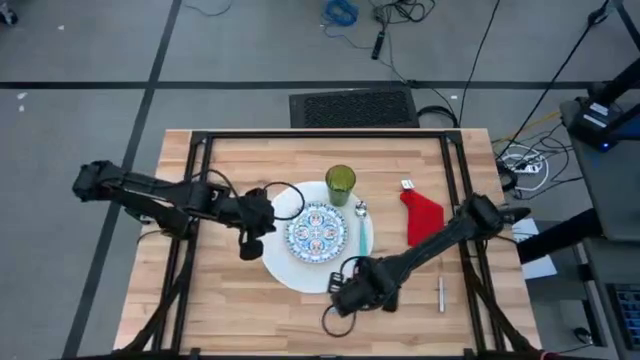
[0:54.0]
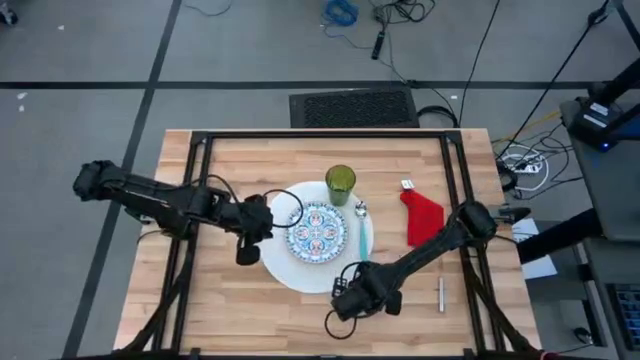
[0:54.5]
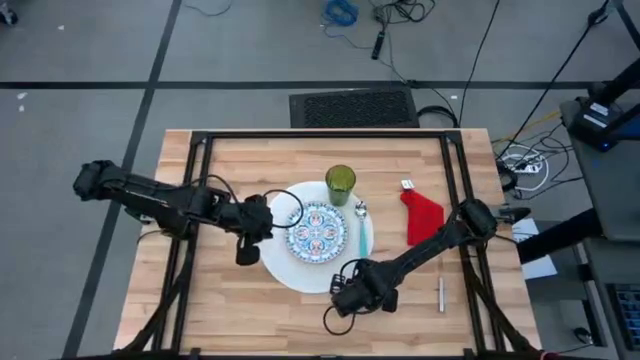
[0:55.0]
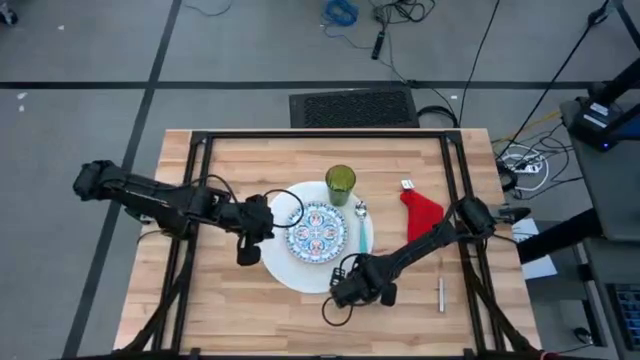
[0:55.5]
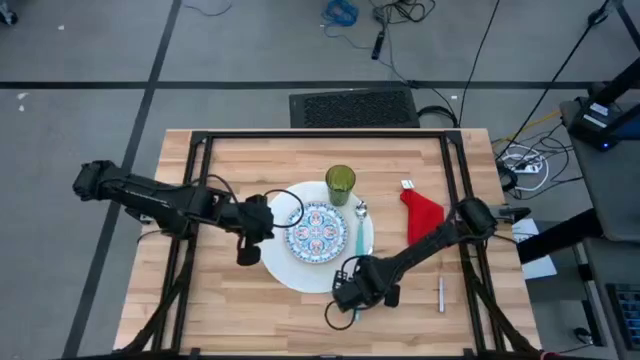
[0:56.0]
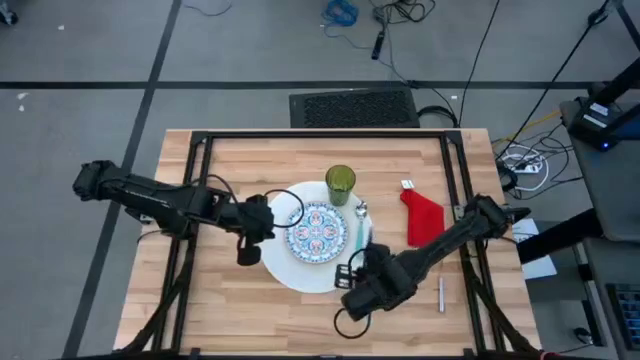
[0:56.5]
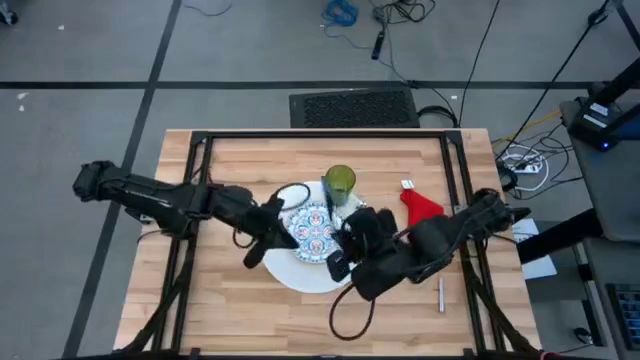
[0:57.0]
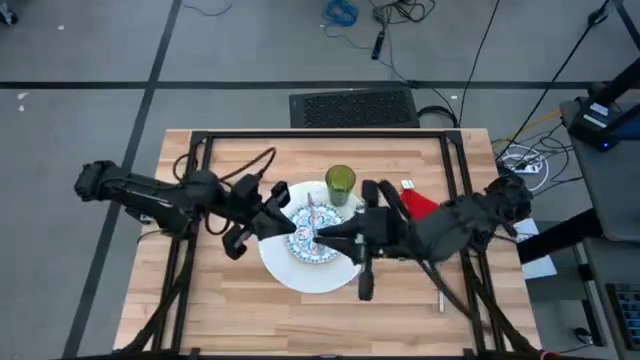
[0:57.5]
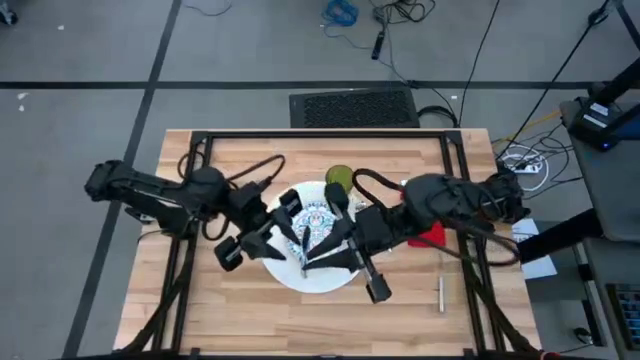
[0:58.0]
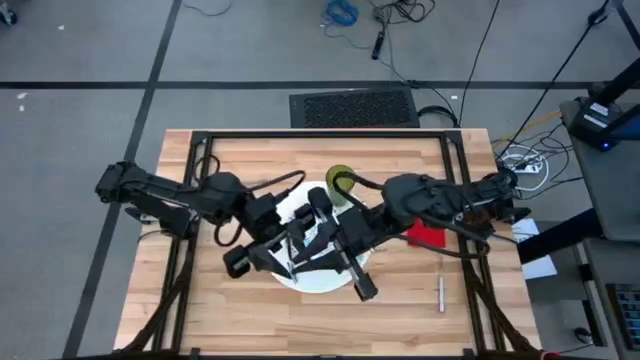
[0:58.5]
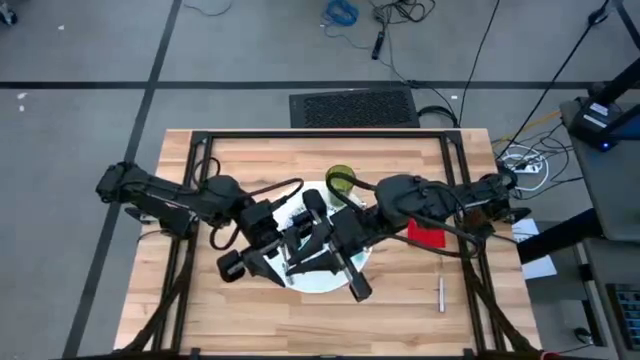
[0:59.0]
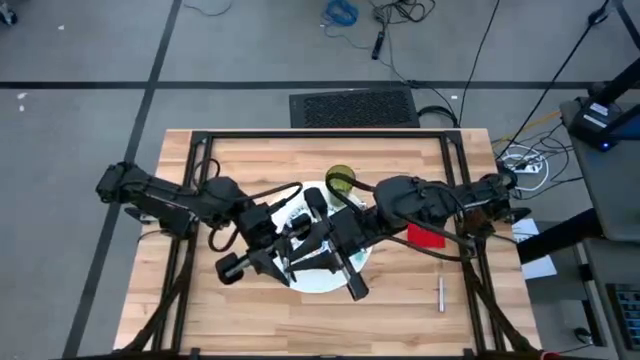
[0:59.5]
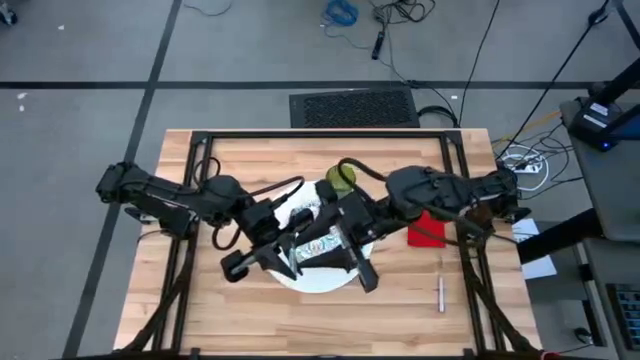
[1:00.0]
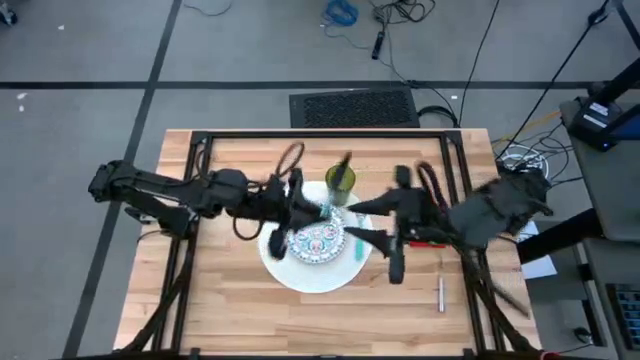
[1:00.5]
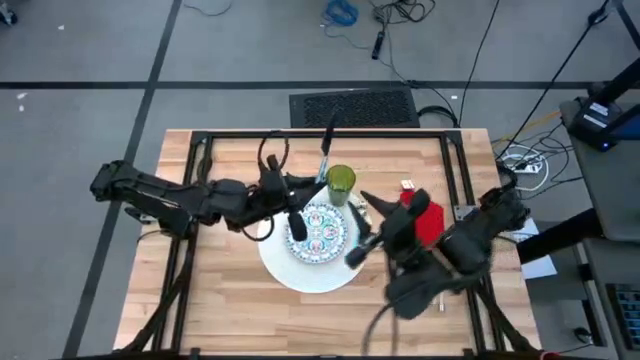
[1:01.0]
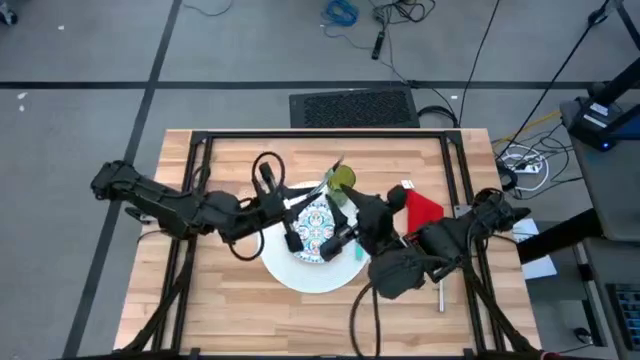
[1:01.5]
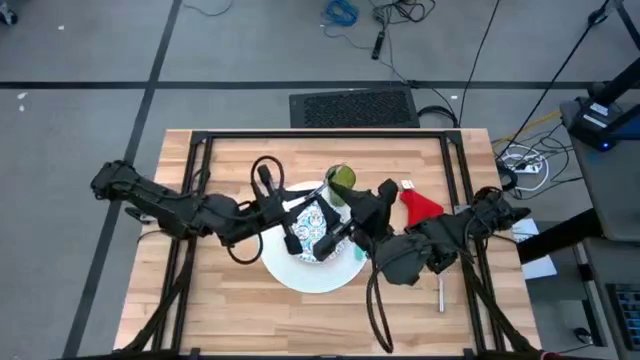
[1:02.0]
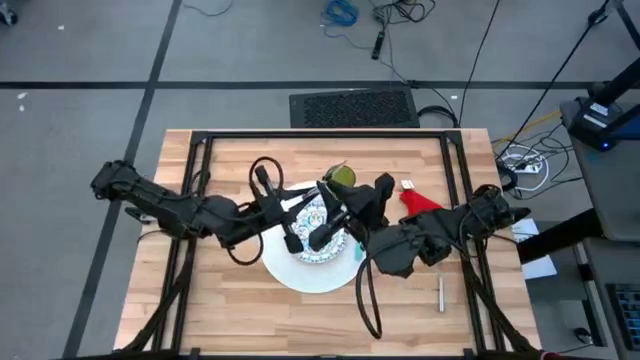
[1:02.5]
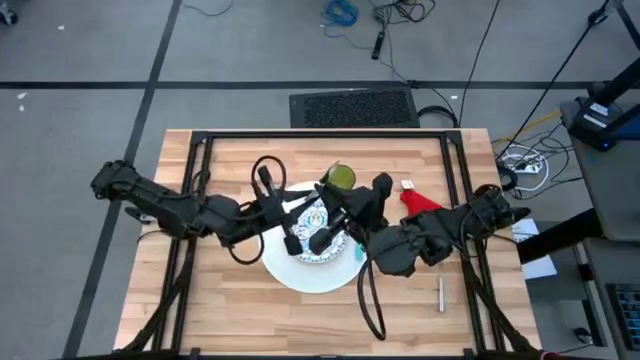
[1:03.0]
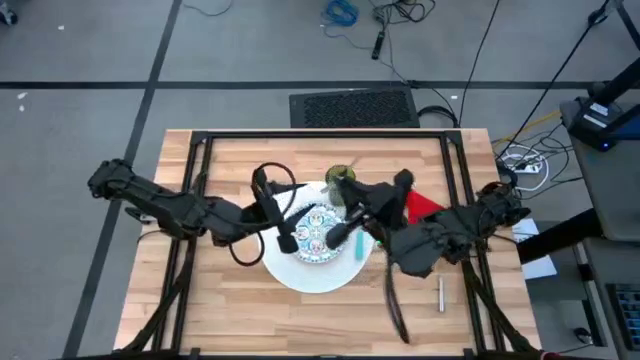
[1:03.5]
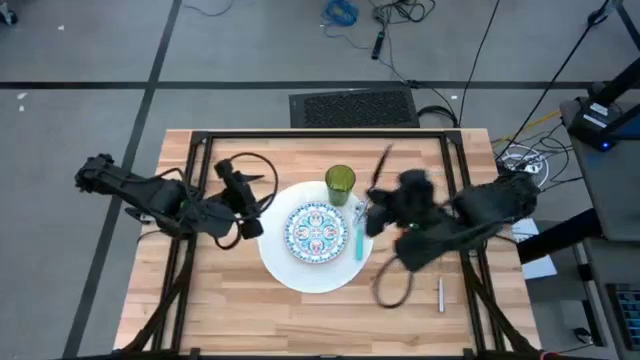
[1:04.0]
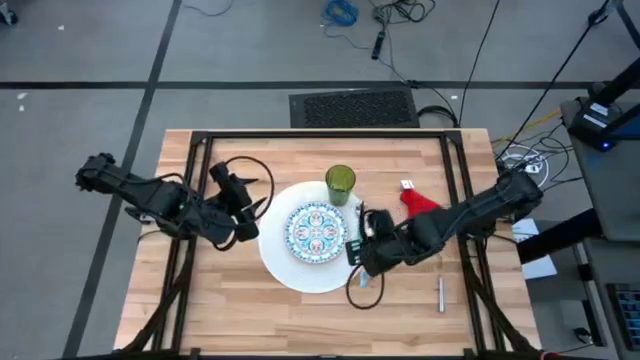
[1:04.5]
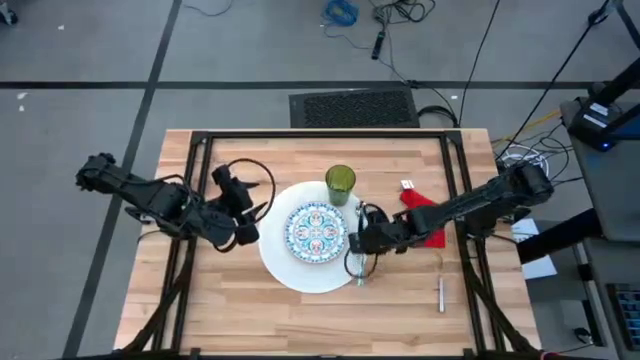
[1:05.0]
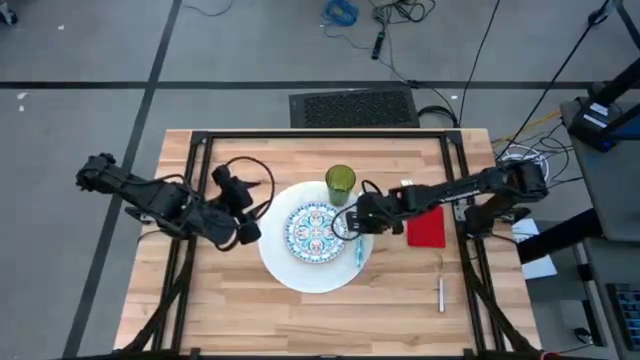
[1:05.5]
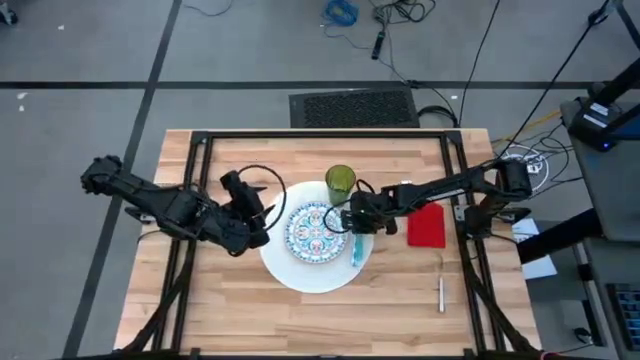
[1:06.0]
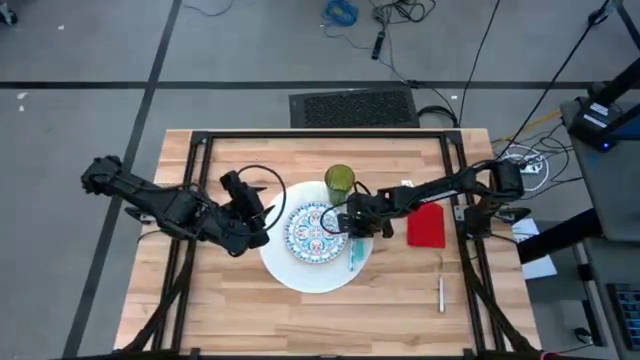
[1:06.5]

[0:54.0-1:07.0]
Task: Set table place
Put the white knife between the white plate and light blue on the white table placemat

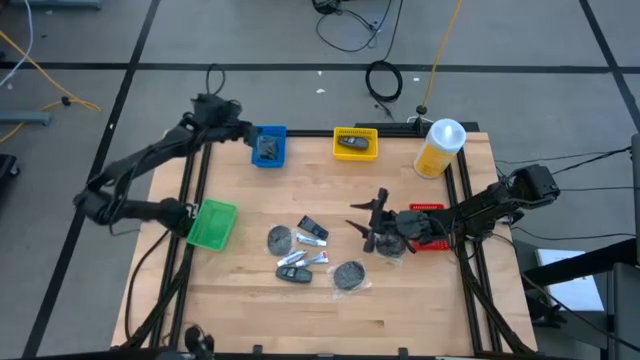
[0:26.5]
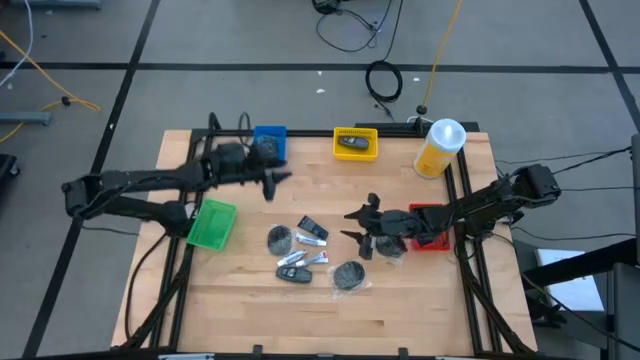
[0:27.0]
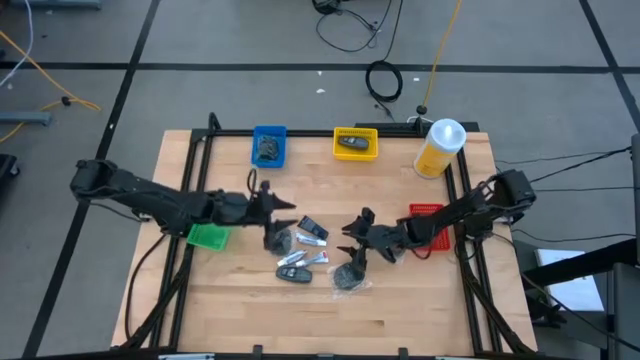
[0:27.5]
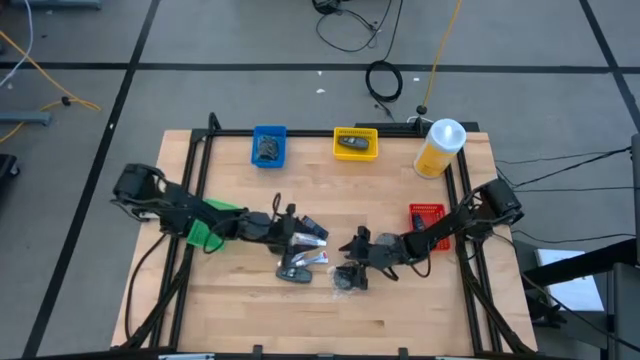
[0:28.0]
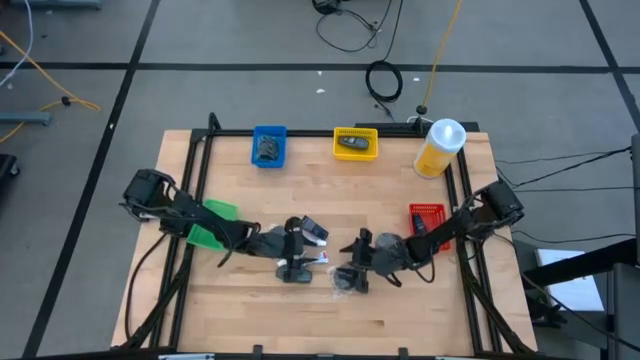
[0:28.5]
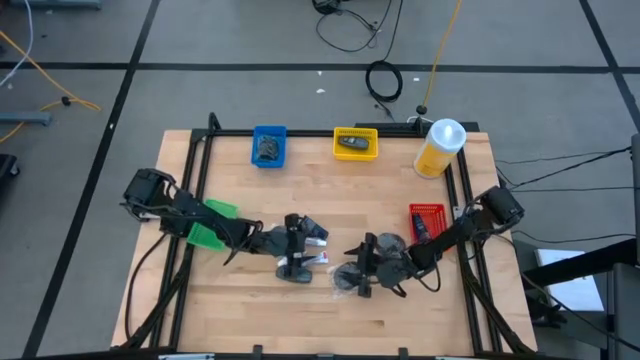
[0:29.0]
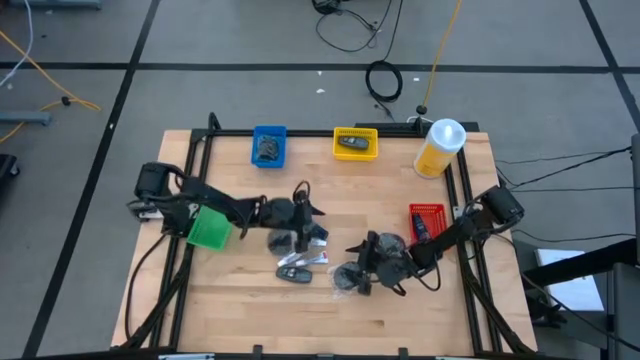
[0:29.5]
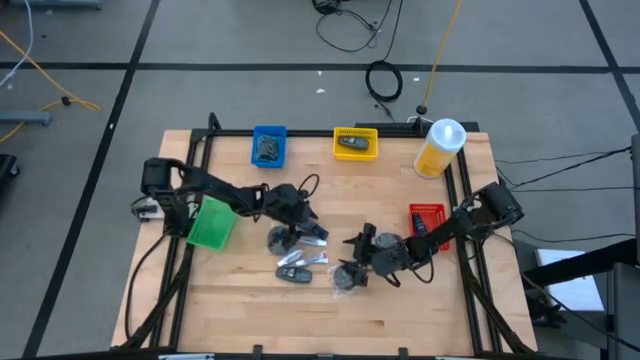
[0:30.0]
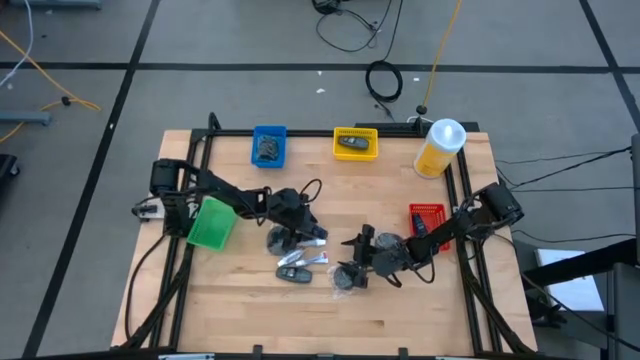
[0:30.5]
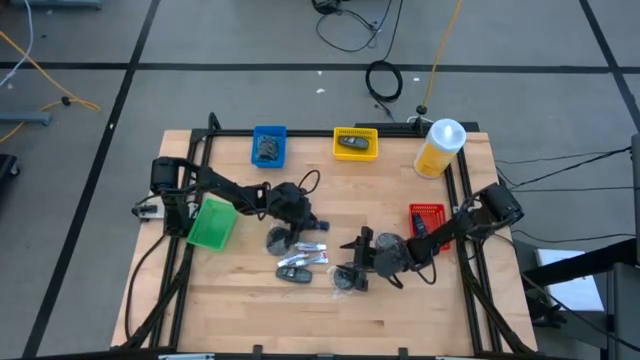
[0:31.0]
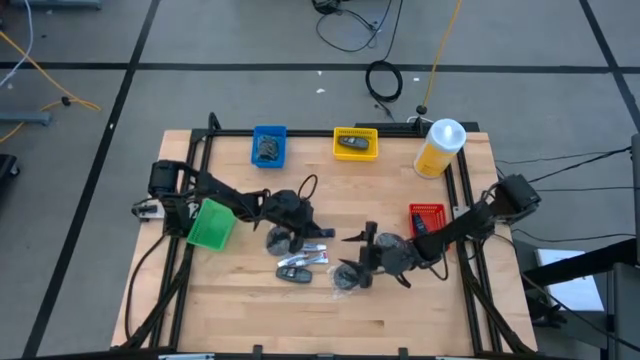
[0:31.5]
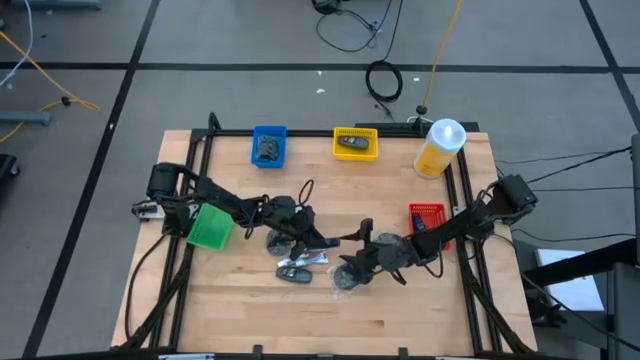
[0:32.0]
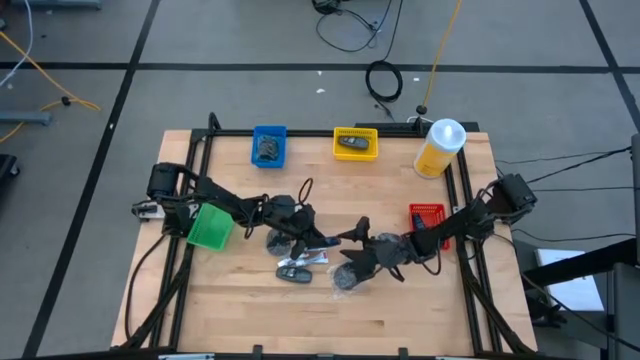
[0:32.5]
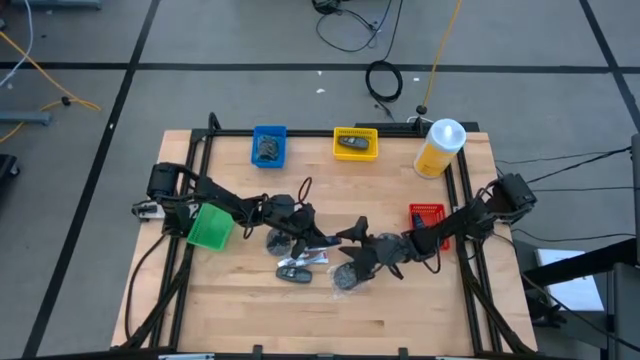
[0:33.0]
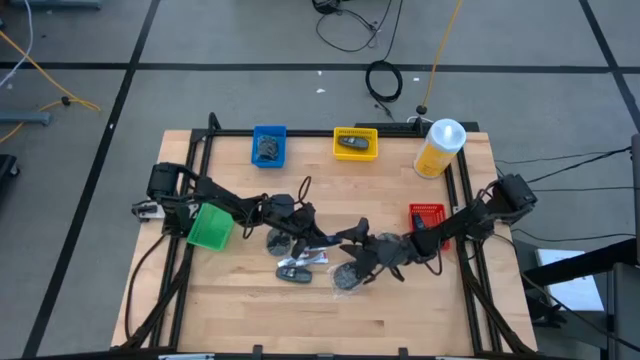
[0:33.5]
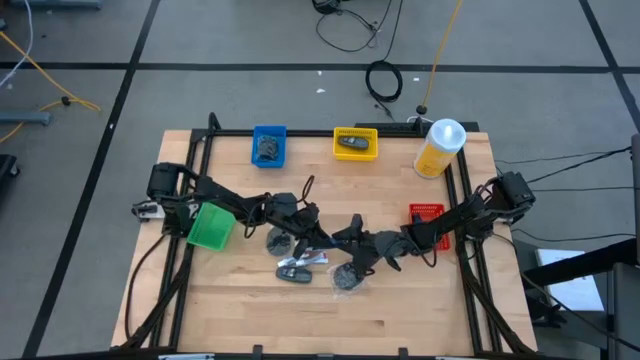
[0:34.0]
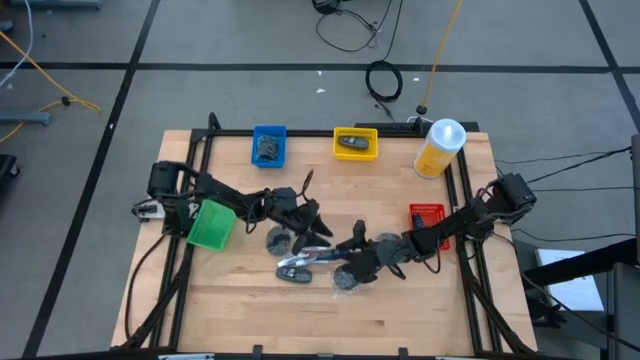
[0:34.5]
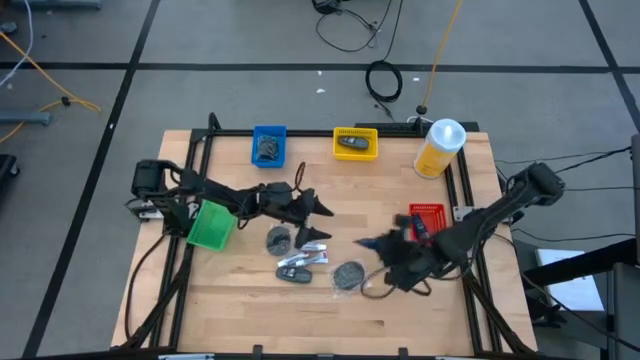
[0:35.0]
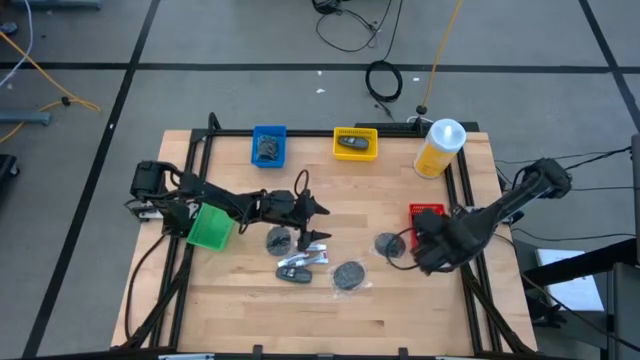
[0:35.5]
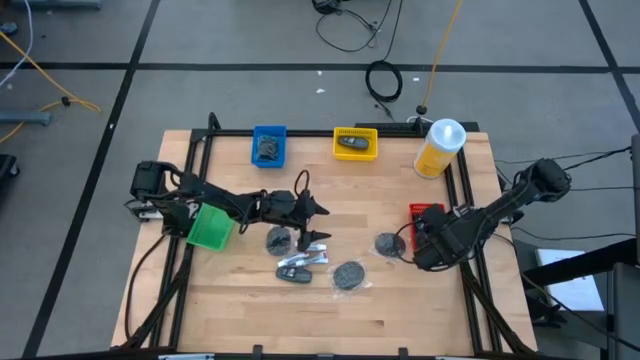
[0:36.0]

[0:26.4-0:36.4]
Task: Pick & Place Travel size toiletries
Put the blue shave cream into the red bin
